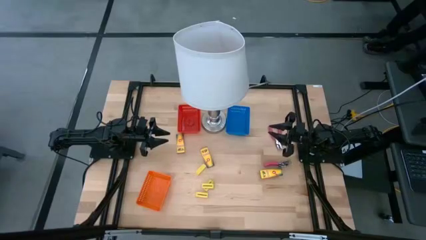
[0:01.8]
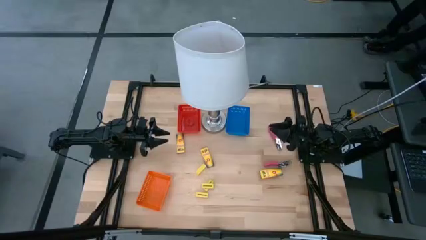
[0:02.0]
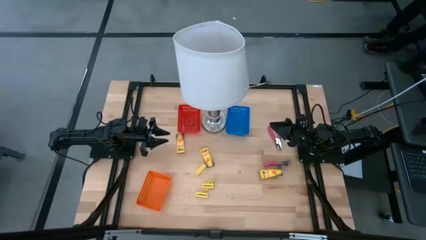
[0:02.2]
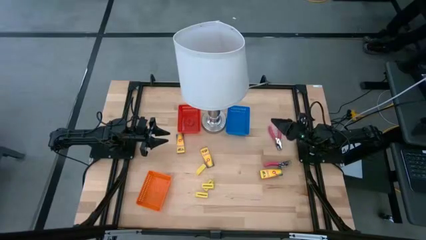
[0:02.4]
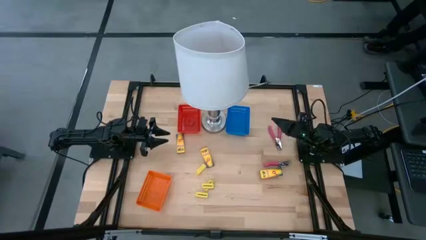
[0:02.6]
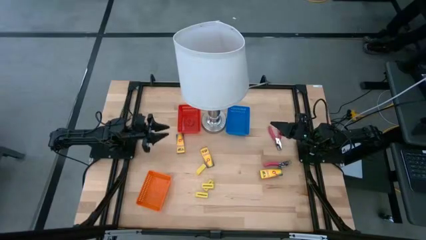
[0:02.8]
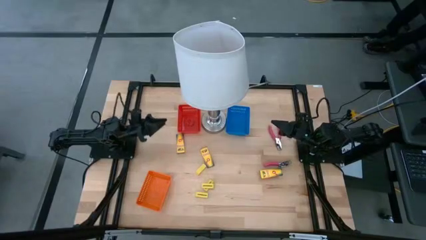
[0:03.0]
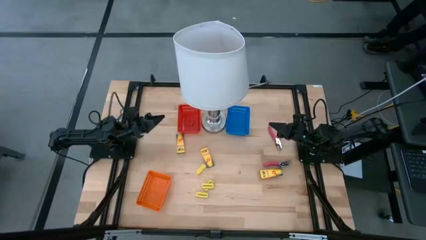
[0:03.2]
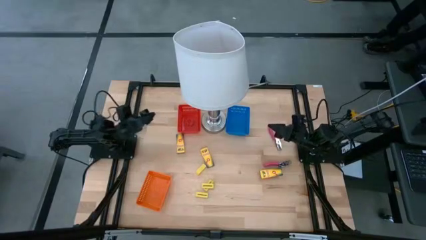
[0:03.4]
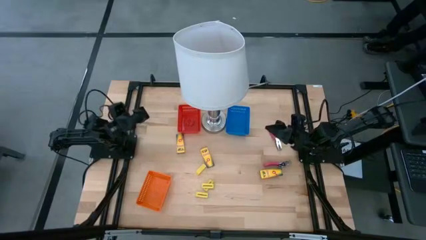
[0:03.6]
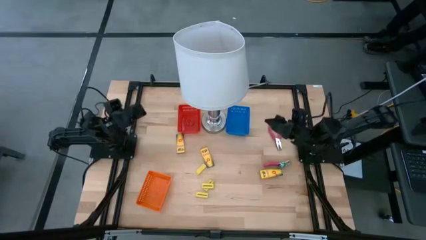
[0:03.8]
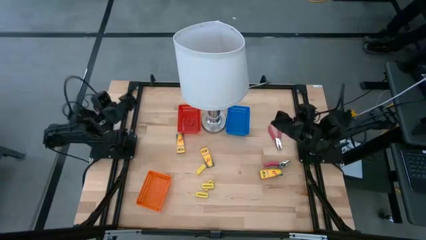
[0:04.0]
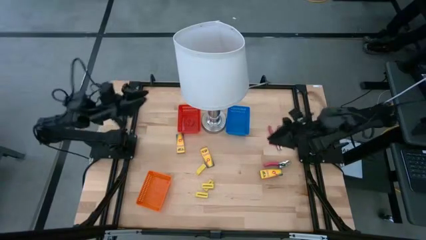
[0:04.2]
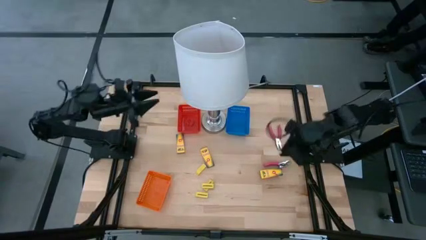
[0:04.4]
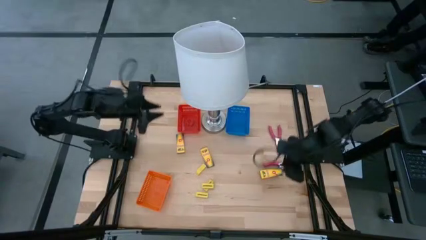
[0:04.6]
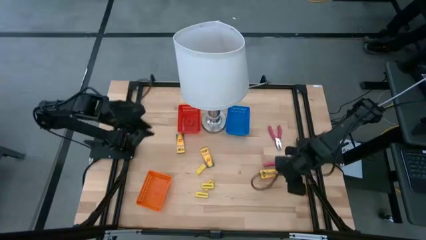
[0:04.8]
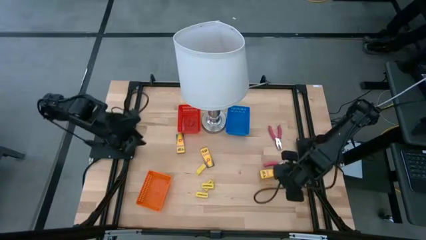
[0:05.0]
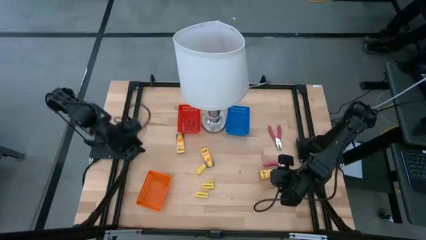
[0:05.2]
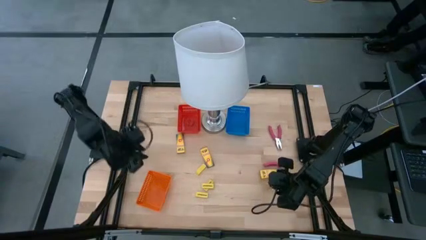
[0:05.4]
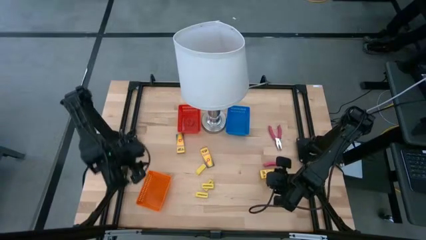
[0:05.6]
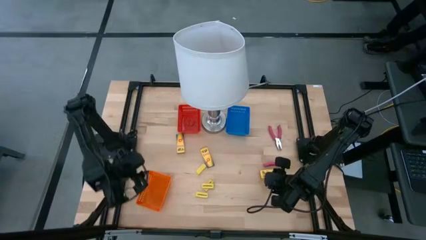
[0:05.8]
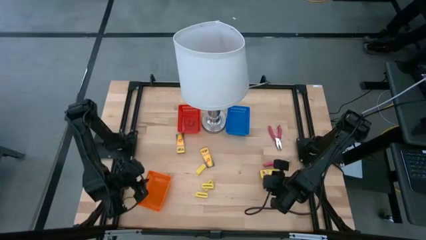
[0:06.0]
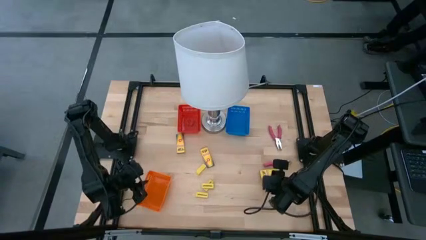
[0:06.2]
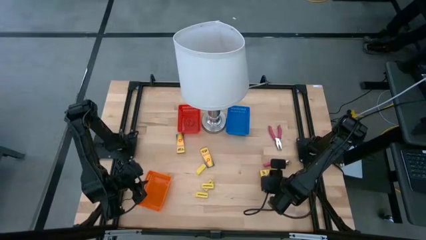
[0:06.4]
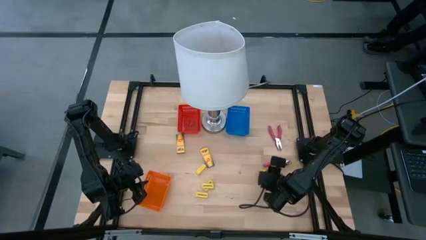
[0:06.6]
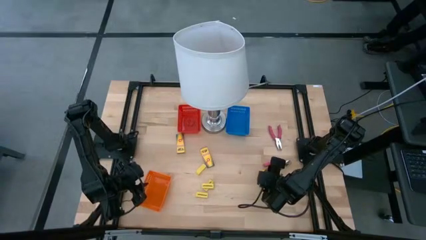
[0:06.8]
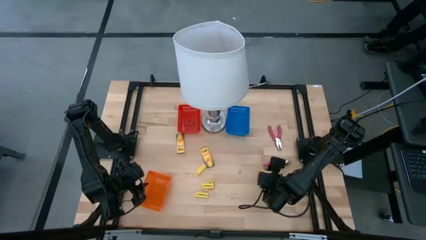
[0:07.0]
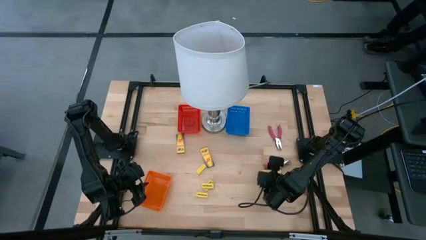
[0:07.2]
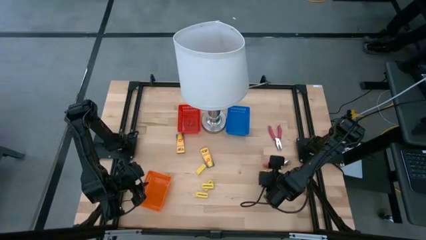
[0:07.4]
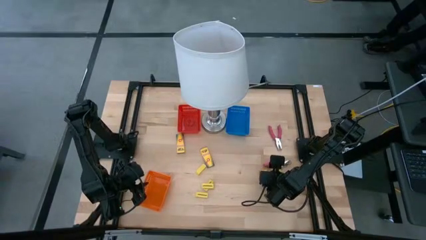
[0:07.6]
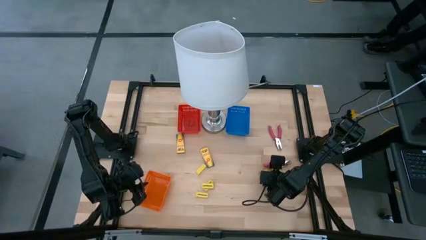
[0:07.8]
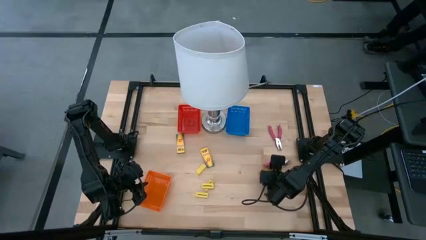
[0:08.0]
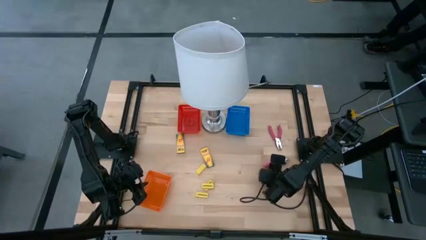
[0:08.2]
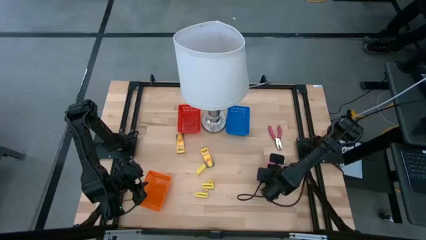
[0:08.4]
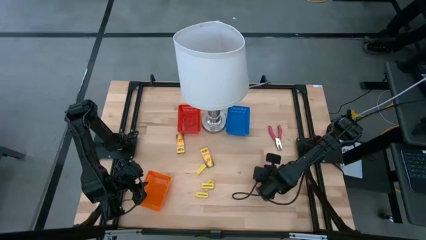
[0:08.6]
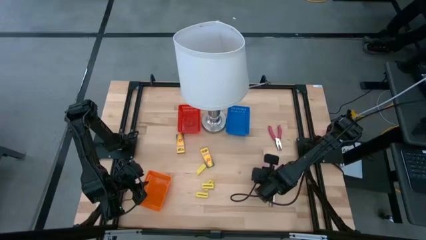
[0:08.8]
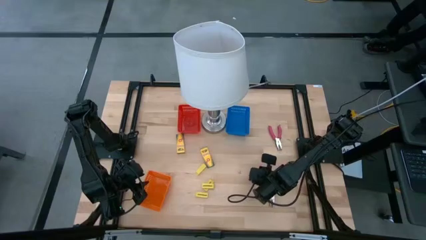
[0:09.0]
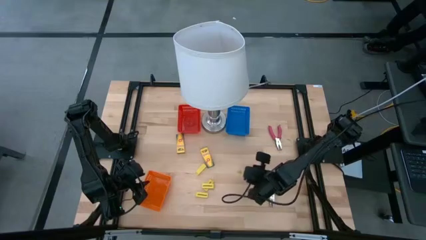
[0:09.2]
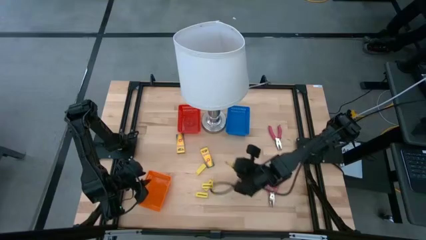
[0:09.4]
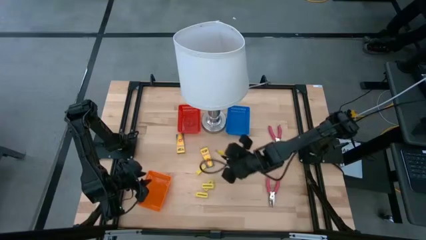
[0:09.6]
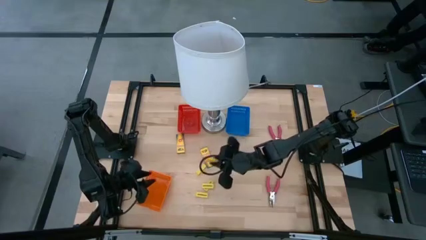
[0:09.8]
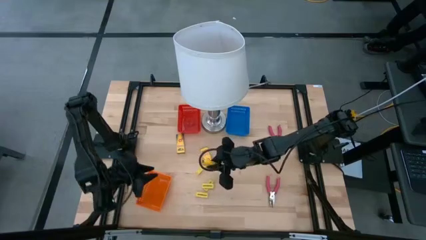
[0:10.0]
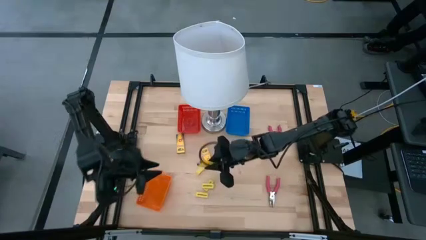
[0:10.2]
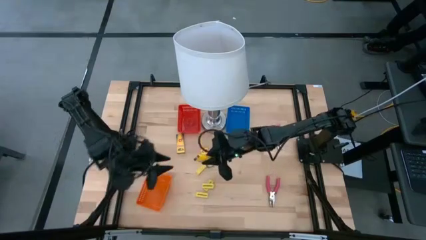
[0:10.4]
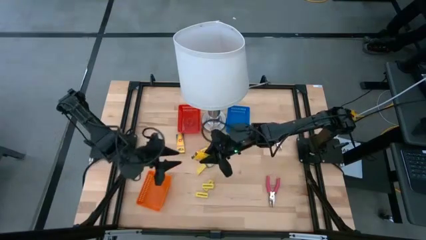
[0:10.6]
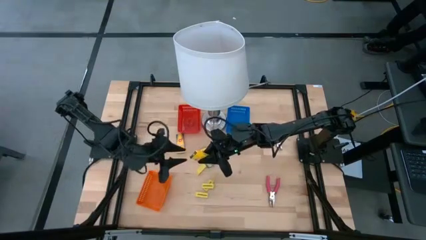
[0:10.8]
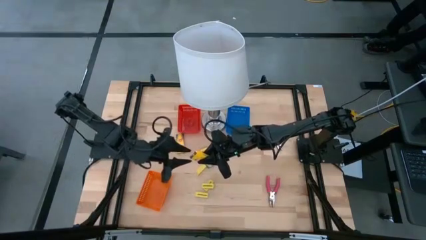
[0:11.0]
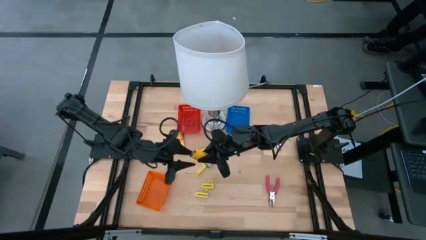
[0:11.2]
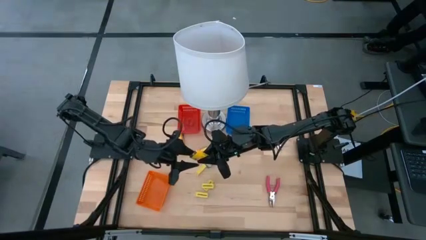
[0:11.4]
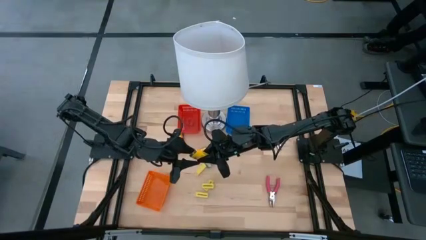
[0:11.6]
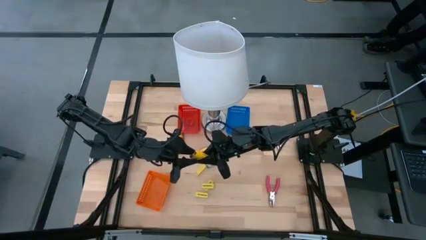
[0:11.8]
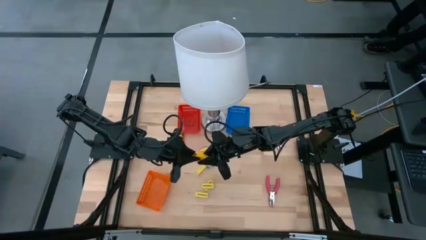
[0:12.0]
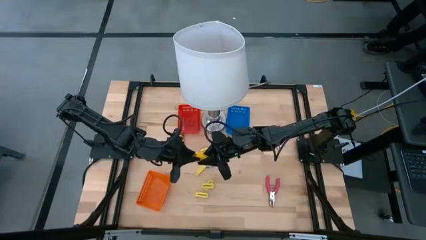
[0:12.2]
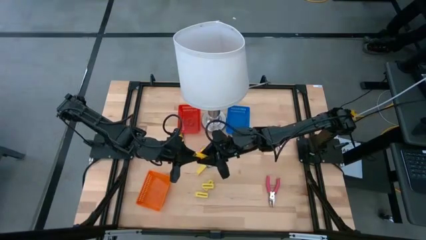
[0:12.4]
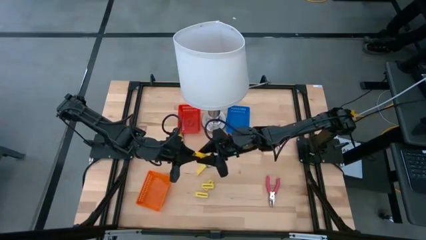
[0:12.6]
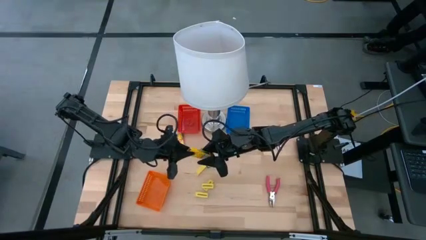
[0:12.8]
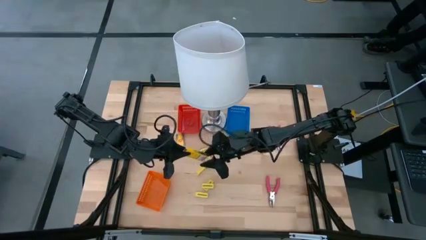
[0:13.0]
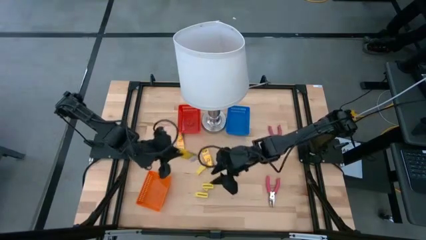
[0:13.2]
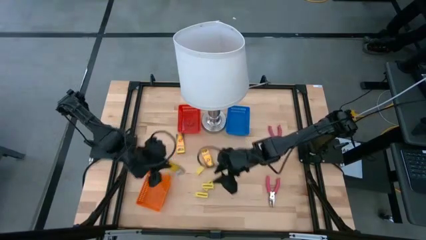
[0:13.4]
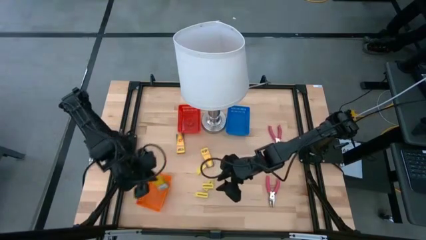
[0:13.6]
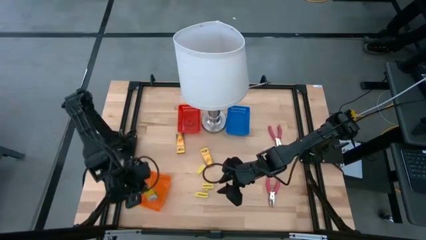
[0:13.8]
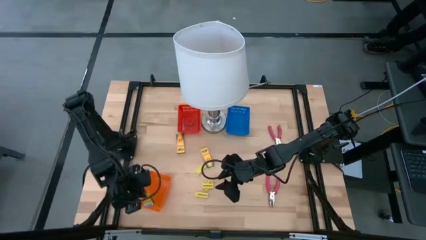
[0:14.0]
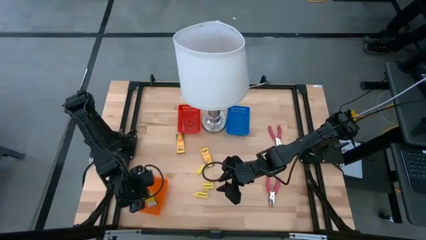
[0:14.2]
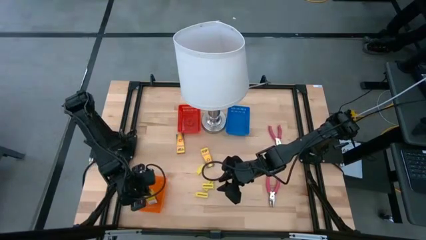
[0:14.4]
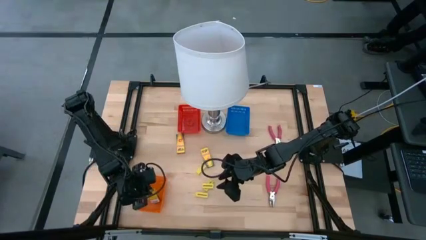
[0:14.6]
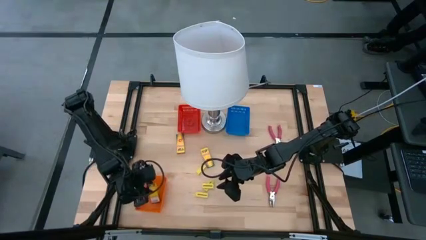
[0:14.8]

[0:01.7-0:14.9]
Task: Pick & Place School Supplies
Put the yellow crayon box into the orange basket

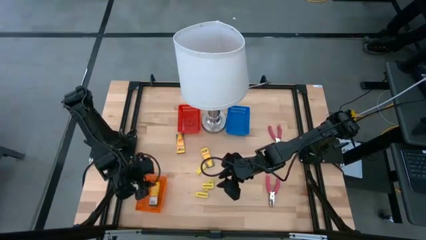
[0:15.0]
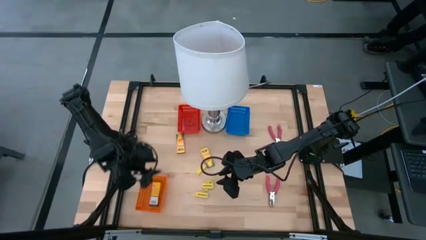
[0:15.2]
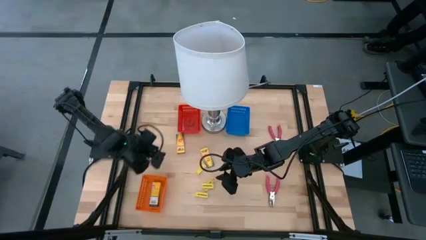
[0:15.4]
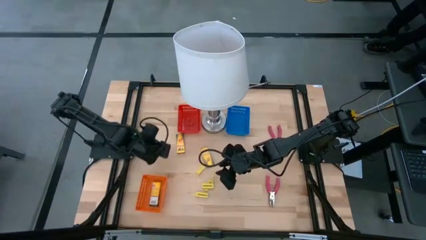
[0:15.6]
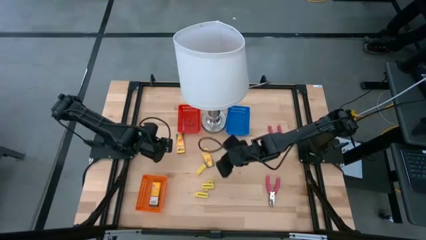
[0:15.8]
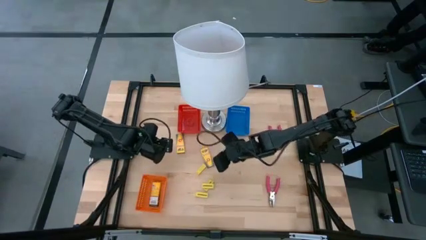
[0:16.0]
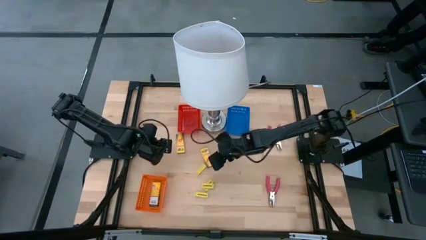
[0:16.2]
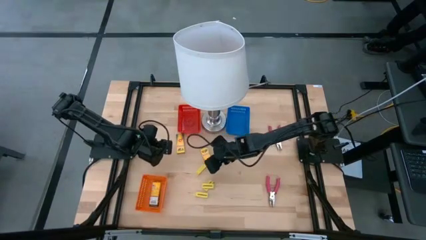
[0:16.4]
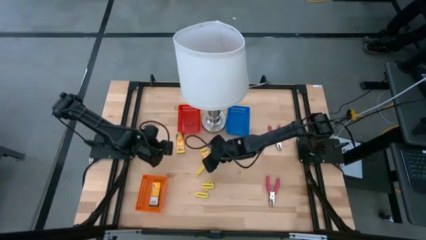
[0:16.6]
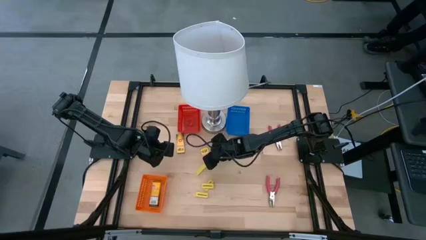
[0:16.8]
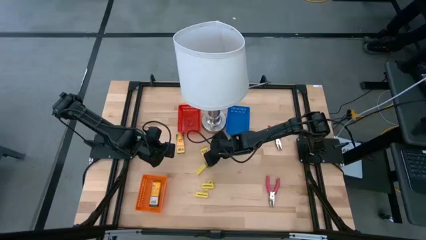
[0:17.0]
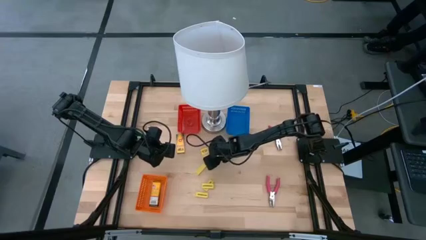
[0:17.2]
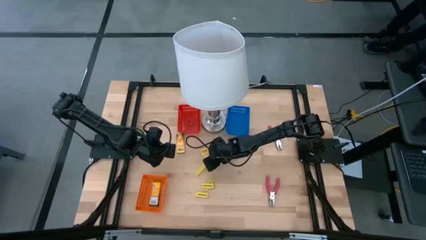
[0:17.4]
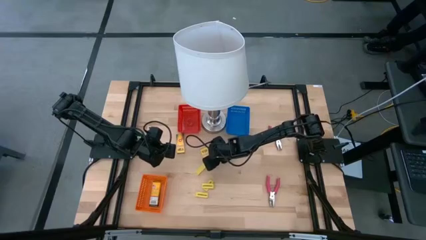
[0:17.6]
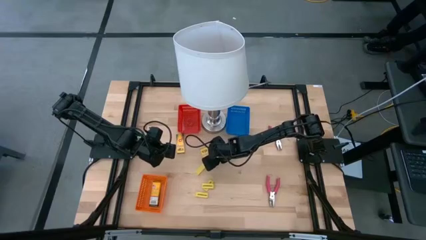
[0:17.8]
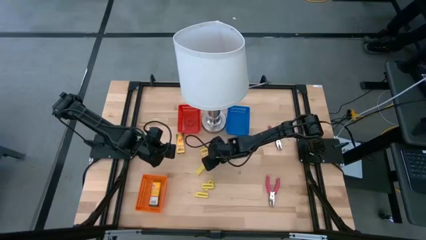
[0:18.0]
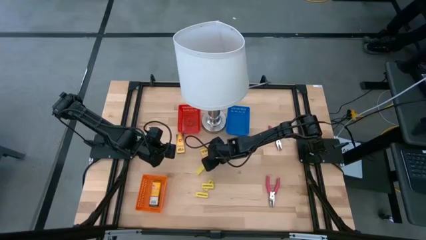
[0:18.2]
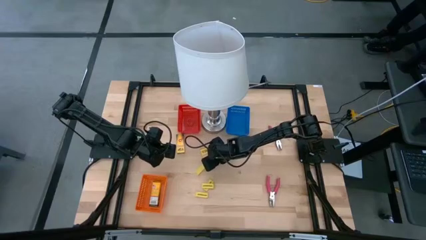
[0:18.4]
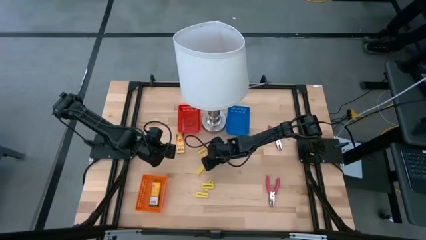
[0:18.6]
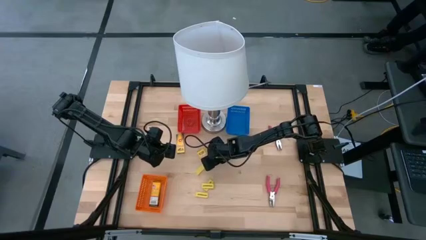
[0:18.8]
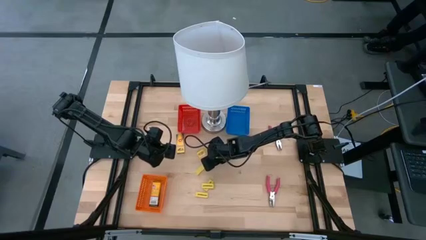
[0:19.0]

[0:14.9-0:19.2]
Put the yellow crayon box into the orange basket
